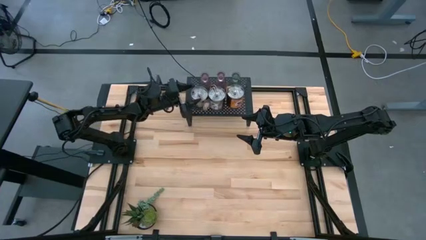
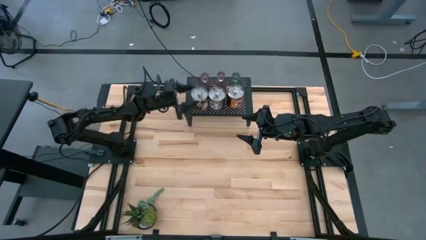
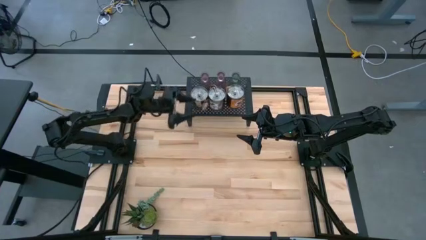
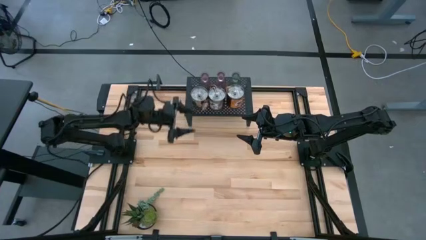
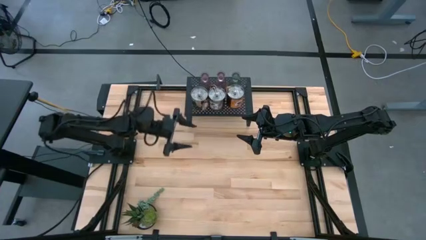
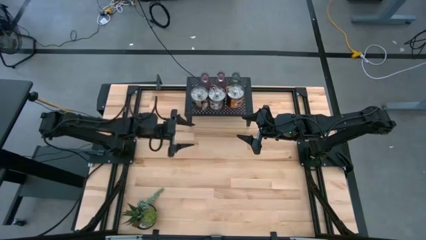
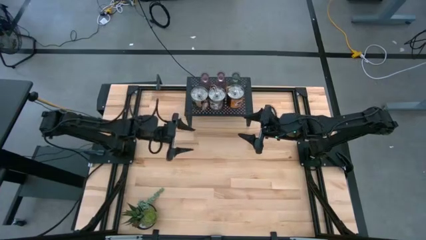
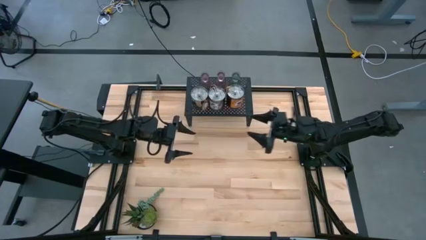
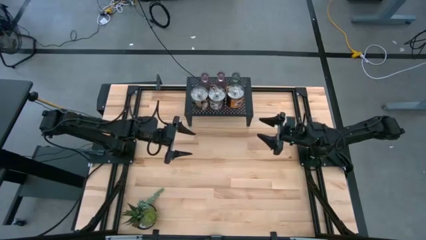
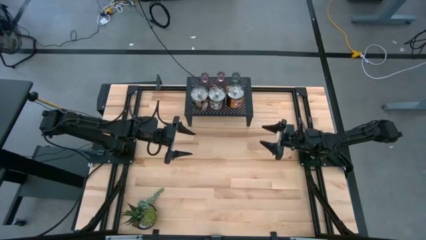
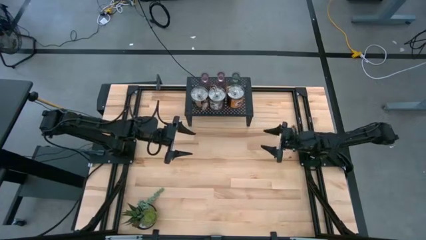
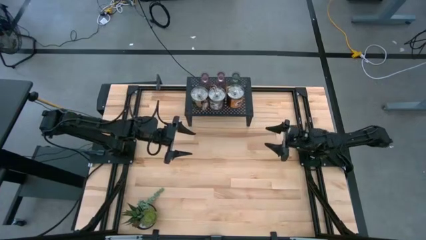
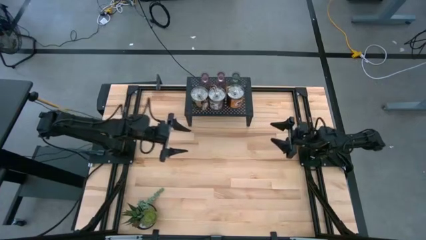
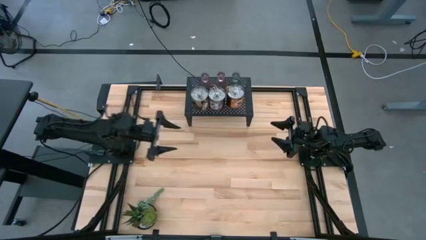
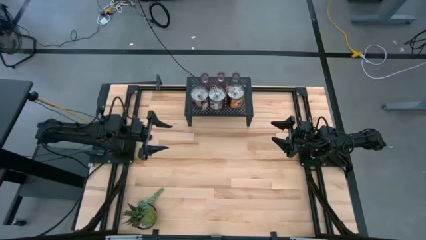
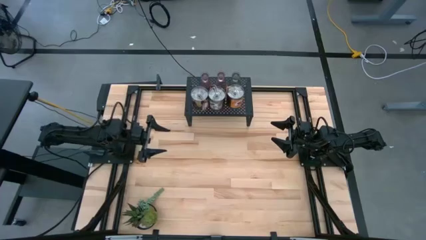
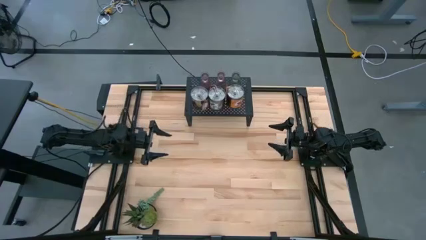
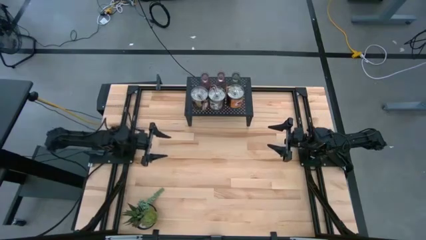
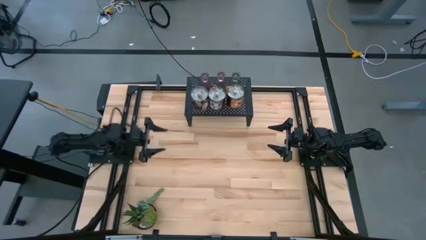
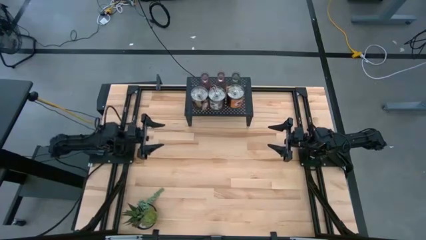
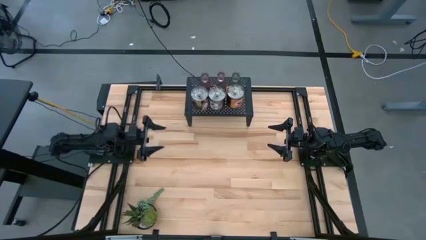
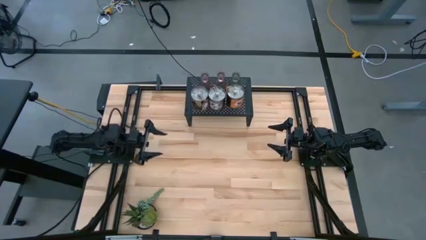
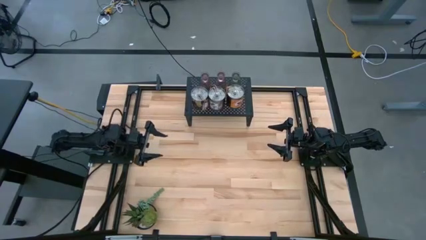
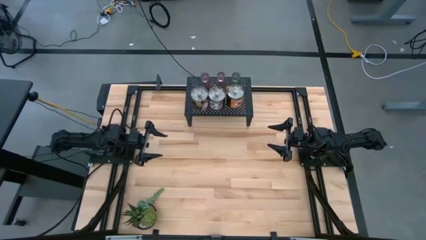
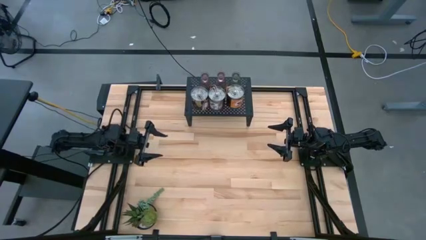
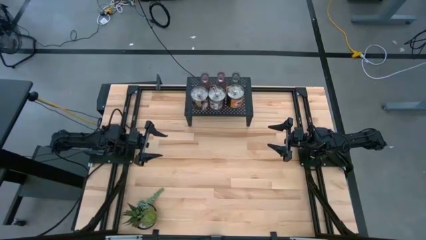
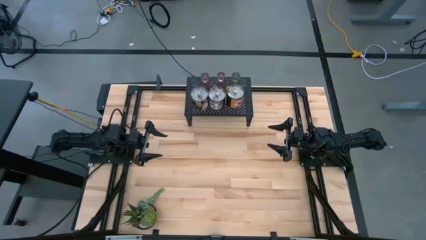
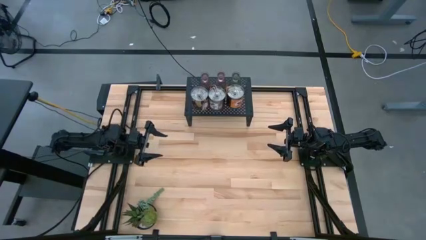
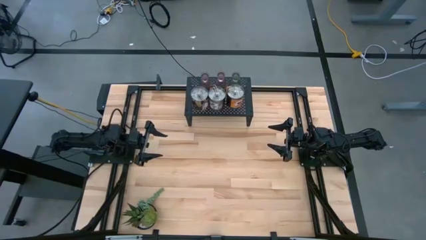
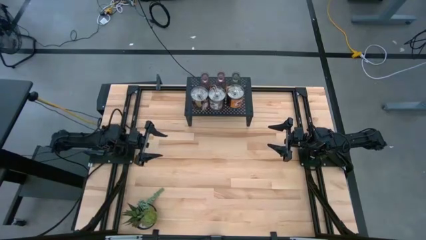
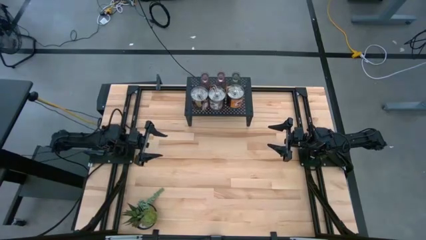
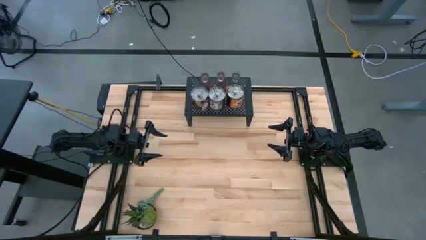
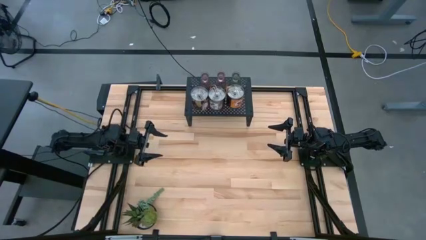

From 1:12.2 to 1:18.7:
Task: Pick & Place candle stick holders
Return to Home Position

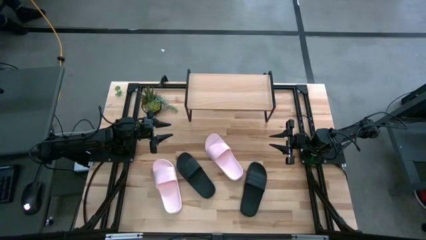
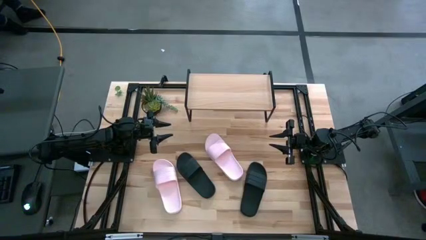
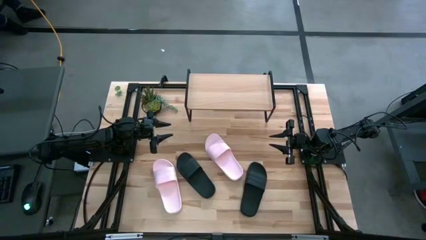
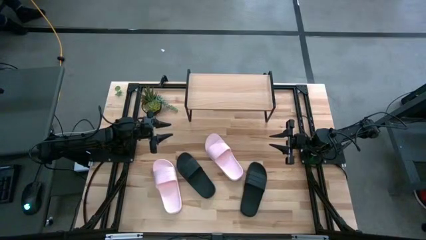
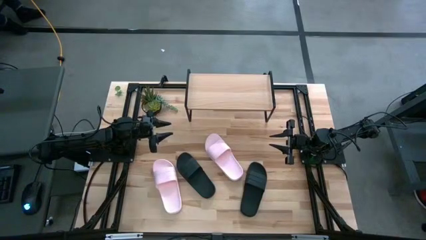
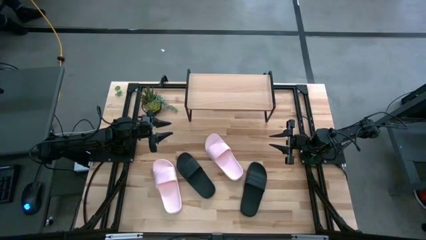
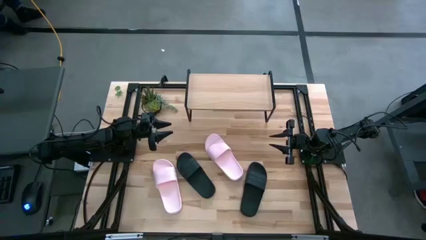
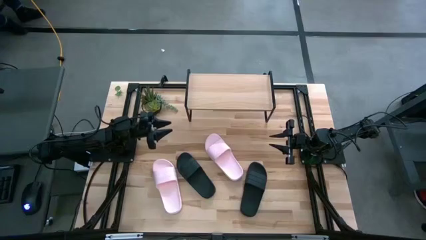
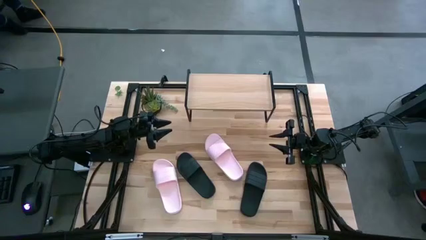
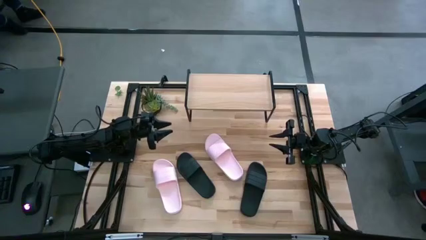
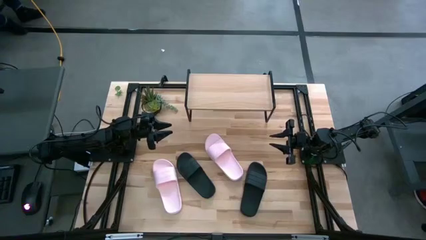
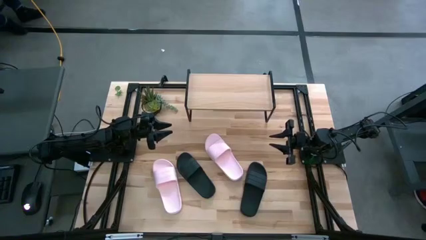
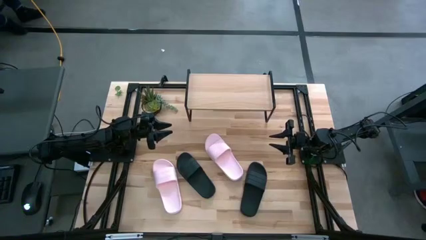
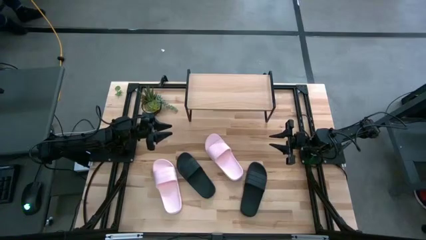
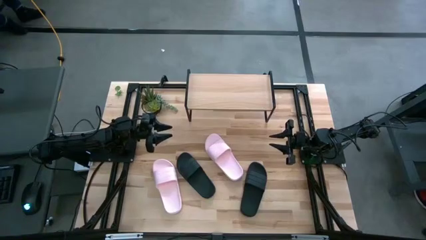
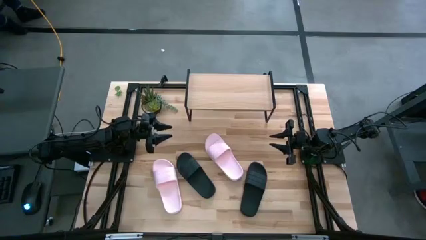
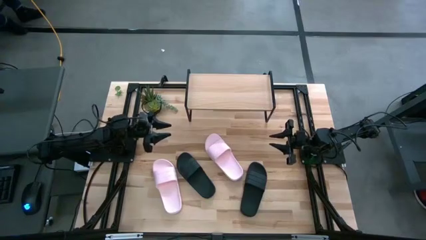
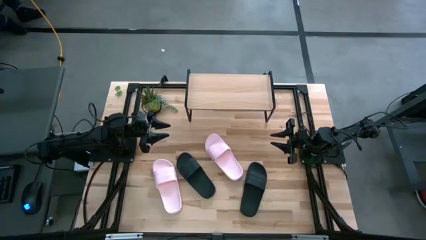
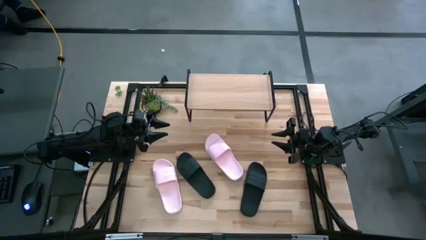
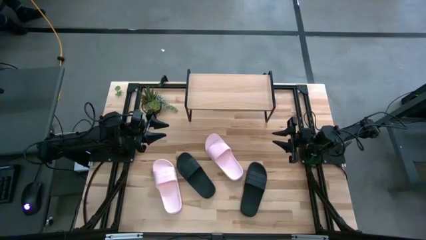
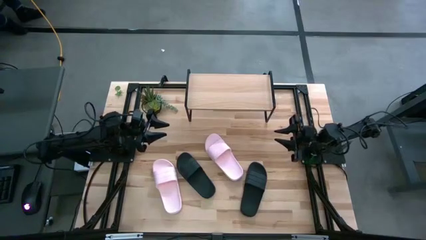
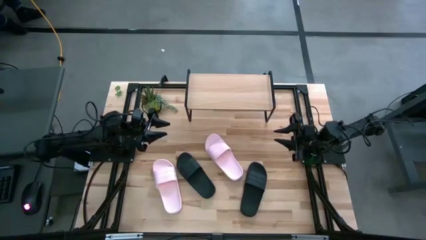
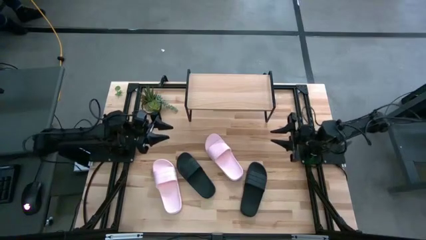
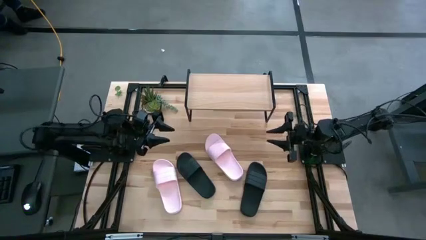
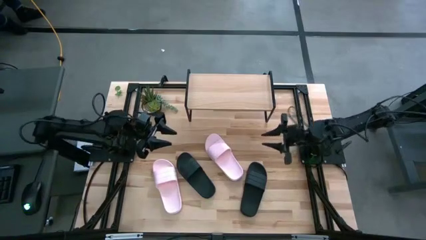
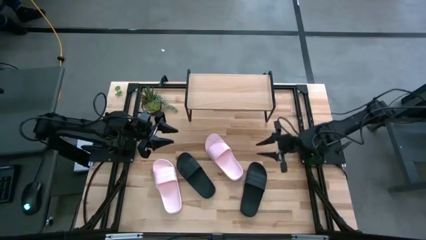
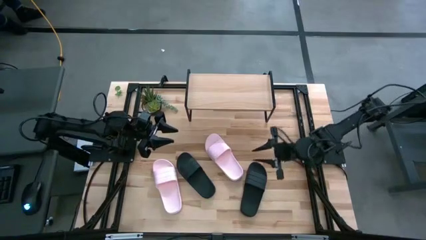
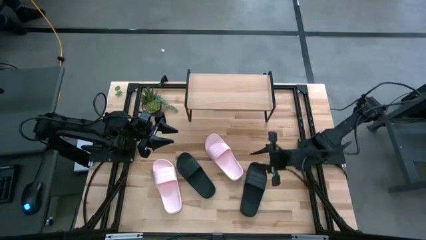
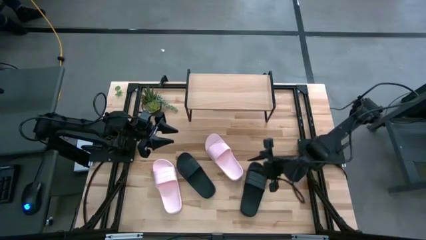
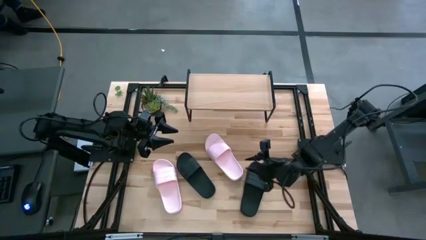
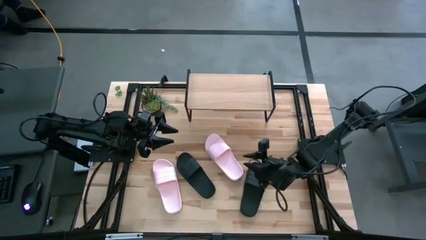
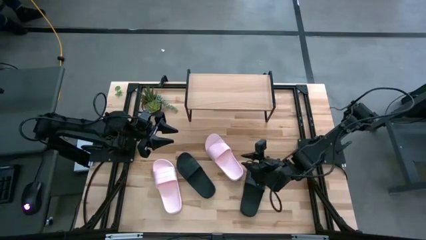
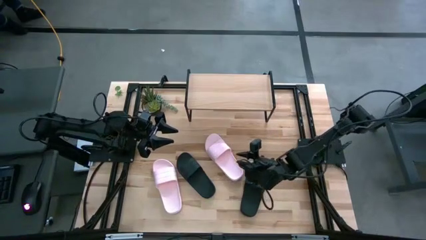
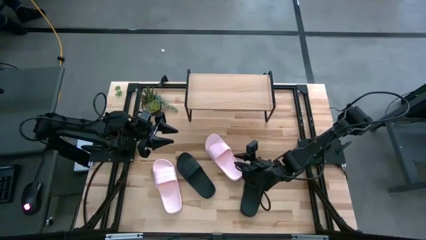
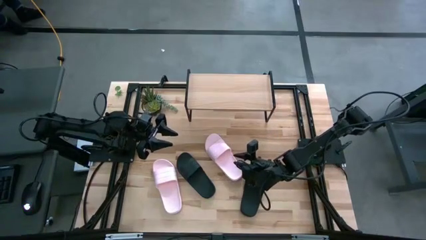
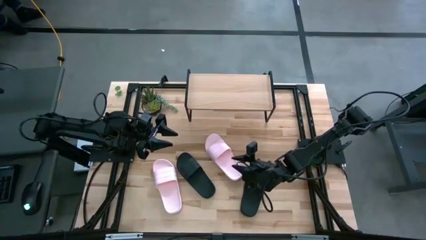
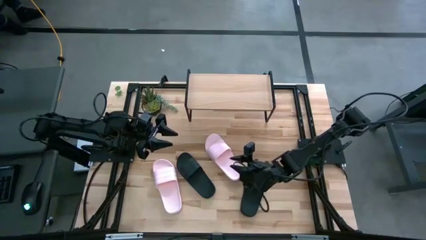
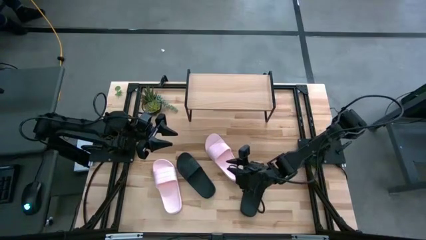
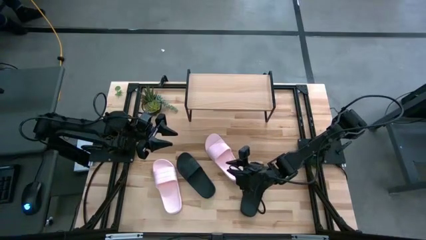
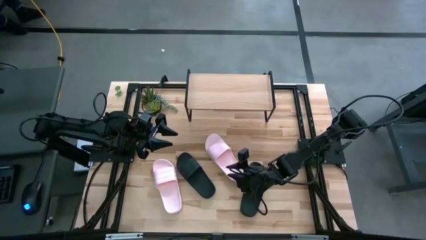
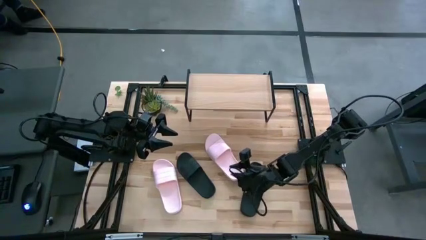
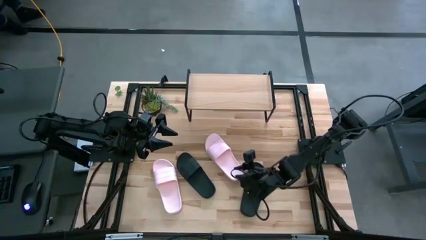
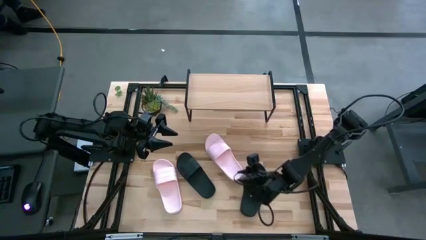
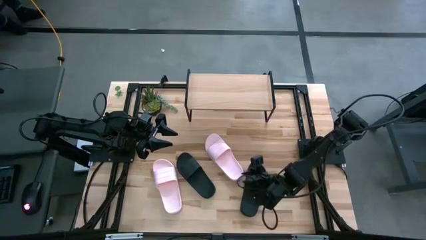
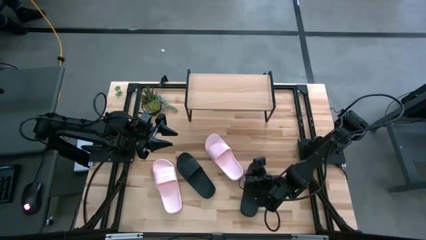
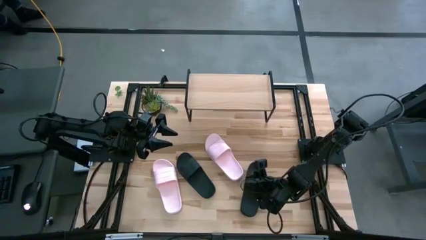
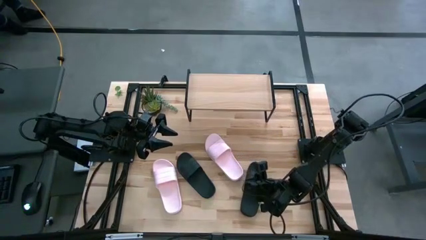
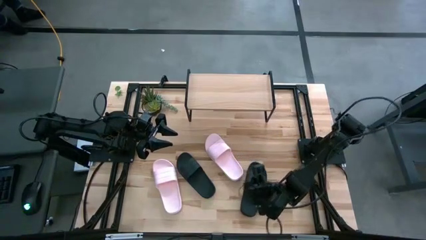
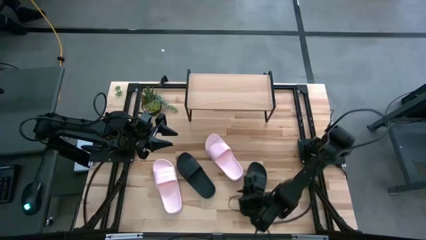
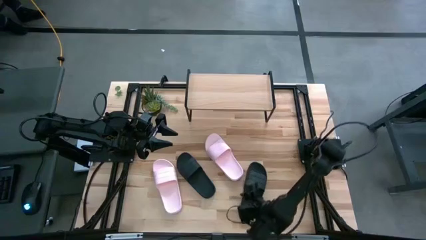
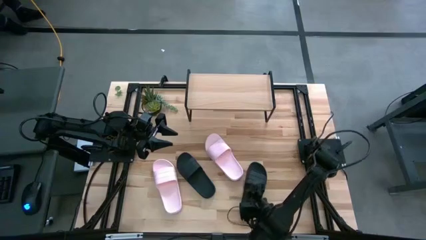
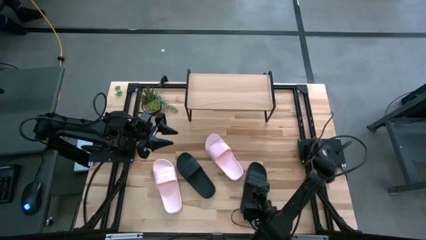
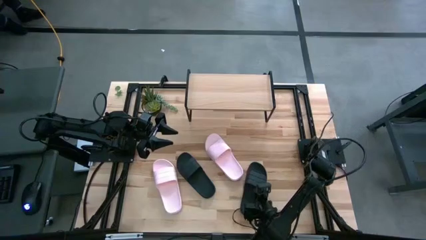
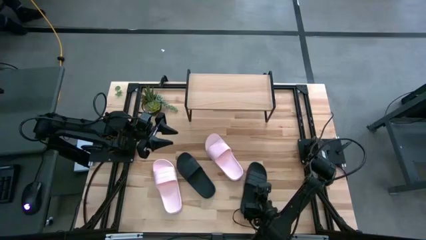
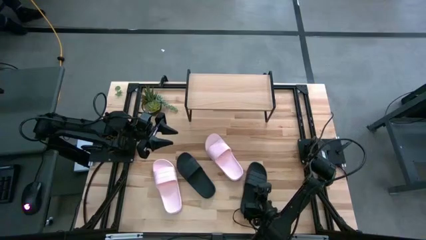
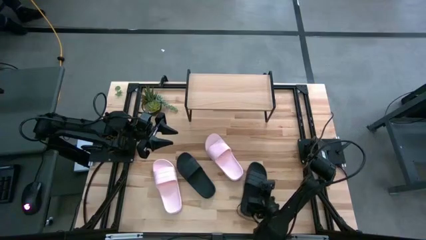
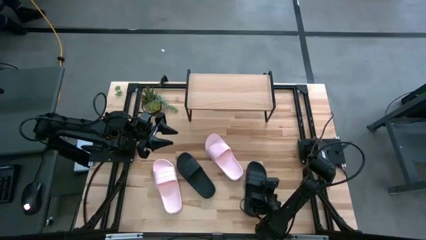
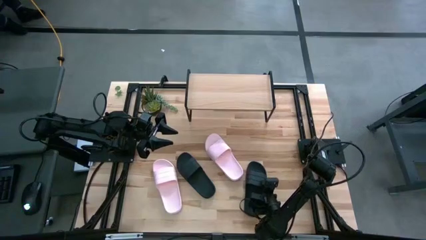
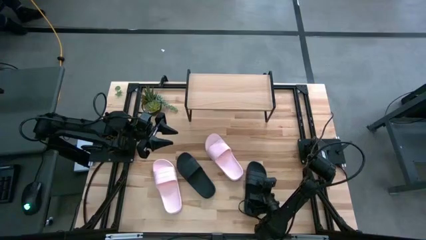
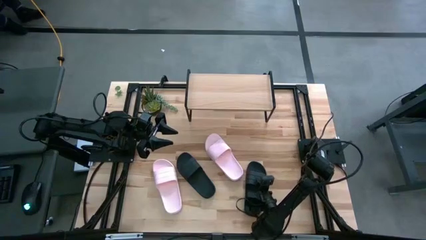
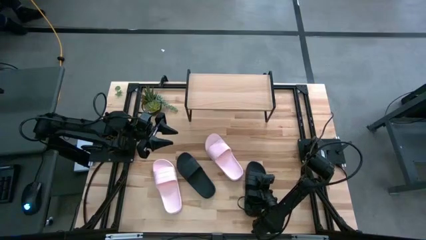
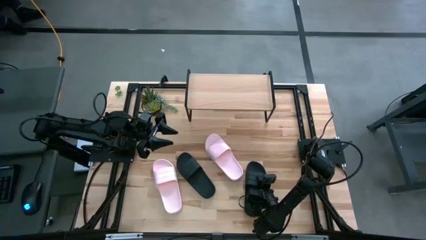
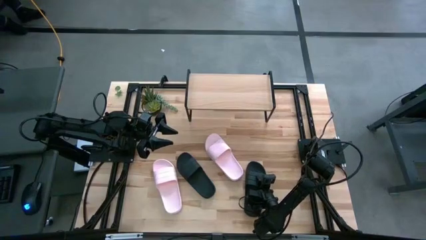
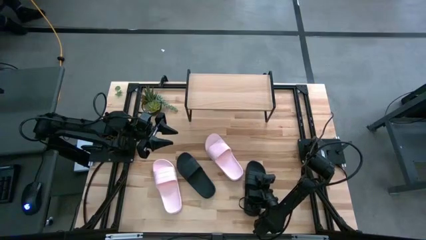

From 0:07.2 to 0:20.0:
Task: Pick and place slides into the shelf
Put the right black slipper on the shelf
